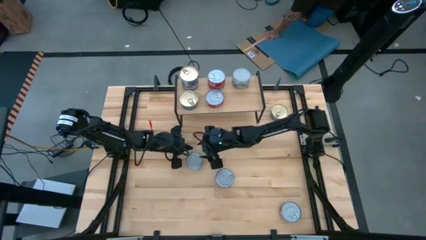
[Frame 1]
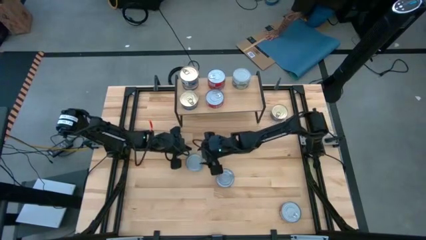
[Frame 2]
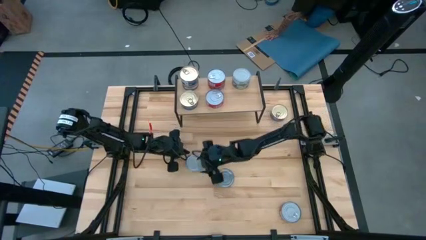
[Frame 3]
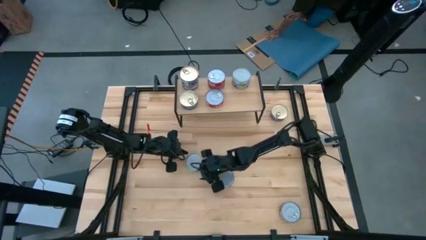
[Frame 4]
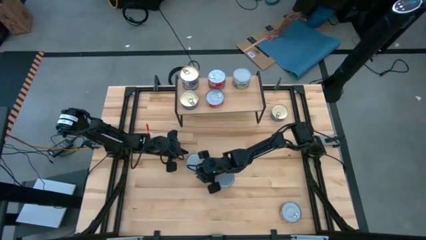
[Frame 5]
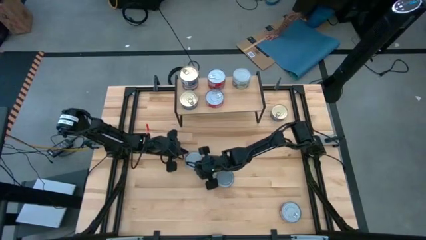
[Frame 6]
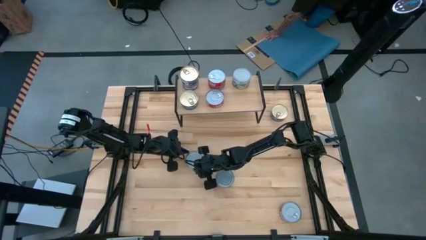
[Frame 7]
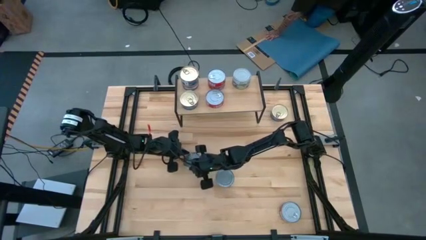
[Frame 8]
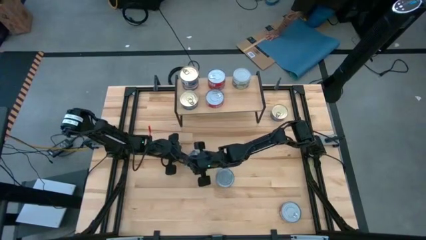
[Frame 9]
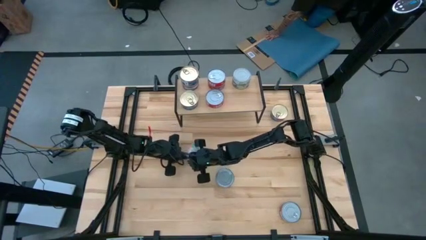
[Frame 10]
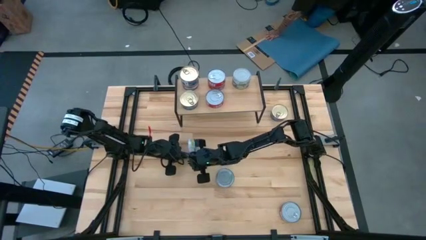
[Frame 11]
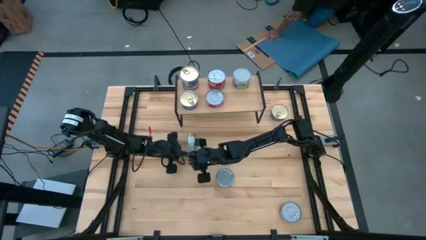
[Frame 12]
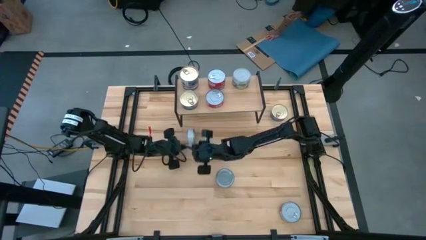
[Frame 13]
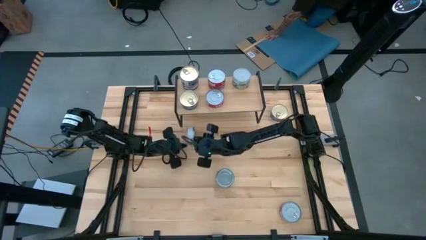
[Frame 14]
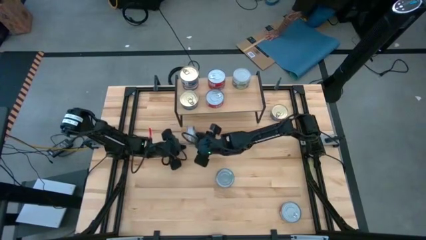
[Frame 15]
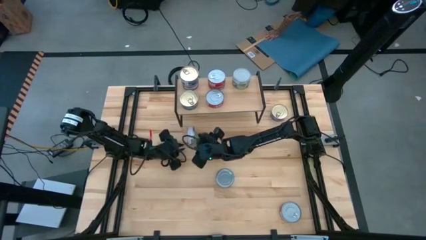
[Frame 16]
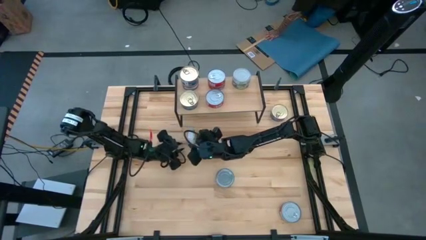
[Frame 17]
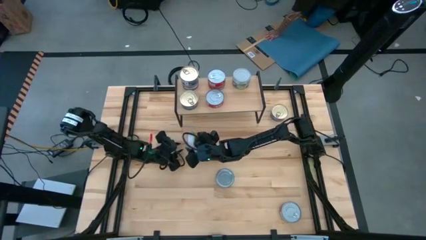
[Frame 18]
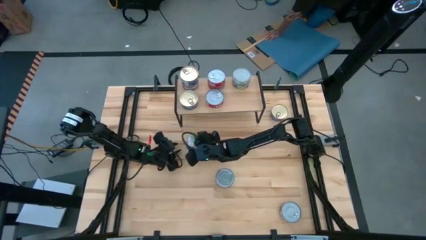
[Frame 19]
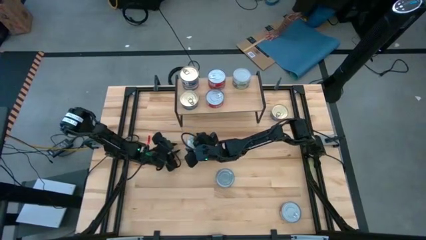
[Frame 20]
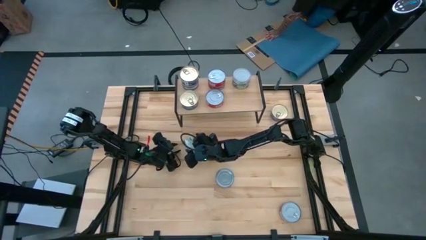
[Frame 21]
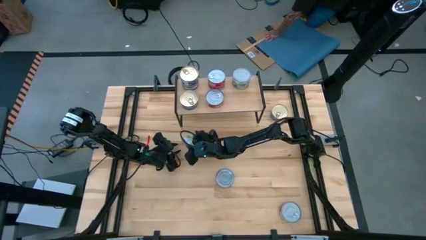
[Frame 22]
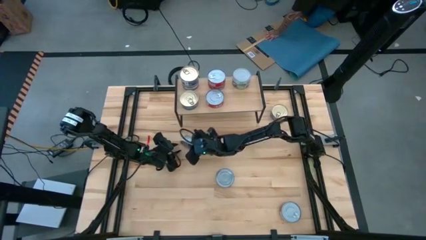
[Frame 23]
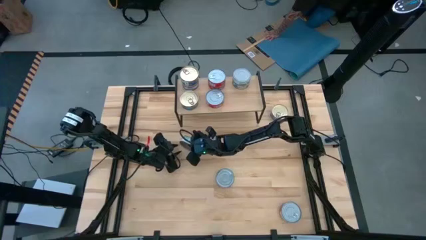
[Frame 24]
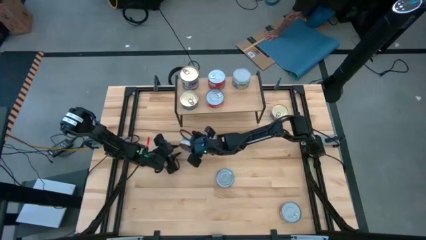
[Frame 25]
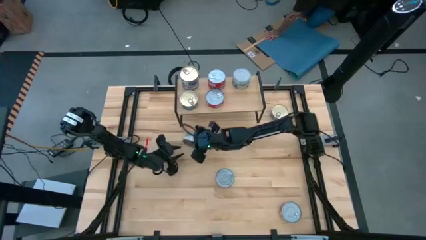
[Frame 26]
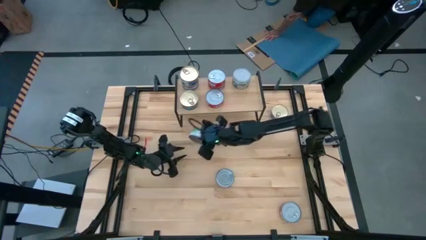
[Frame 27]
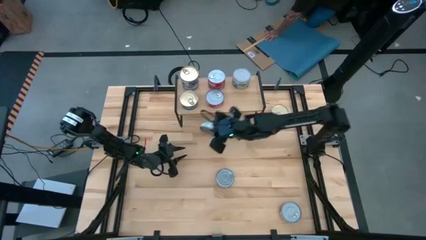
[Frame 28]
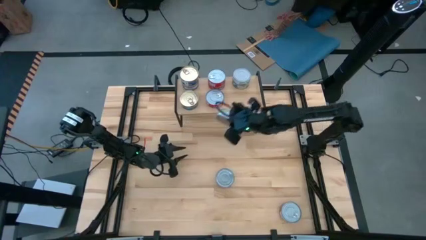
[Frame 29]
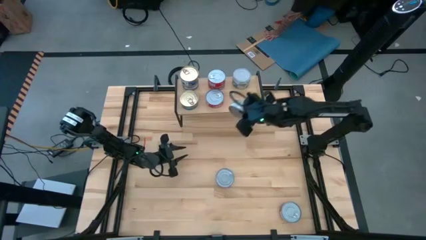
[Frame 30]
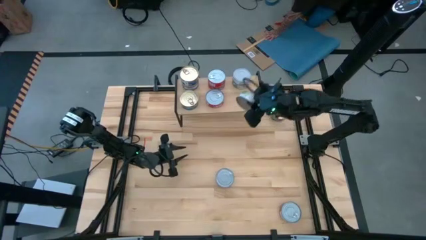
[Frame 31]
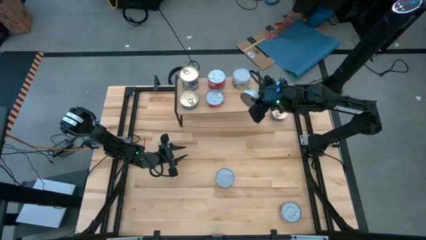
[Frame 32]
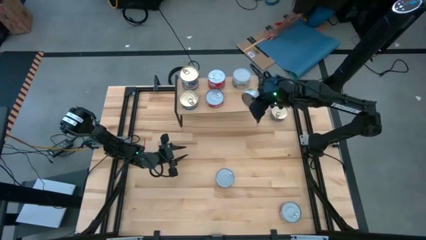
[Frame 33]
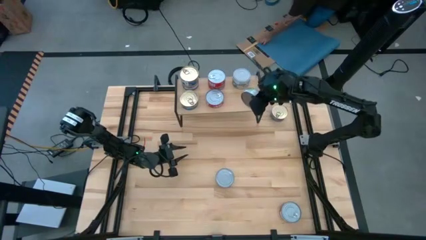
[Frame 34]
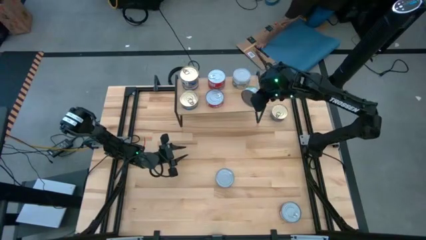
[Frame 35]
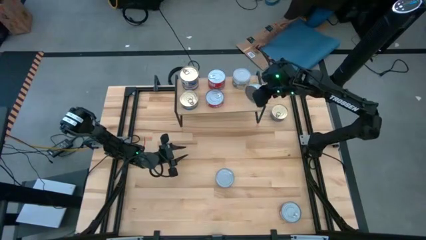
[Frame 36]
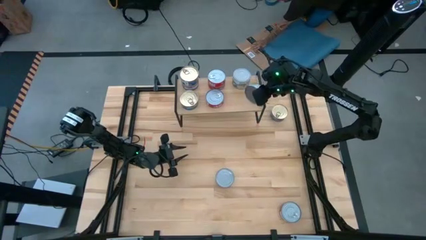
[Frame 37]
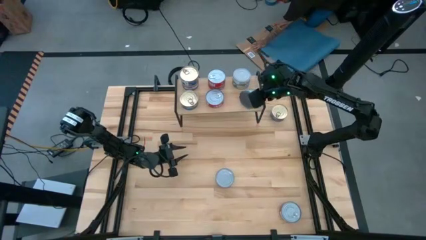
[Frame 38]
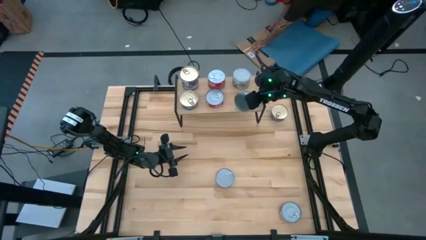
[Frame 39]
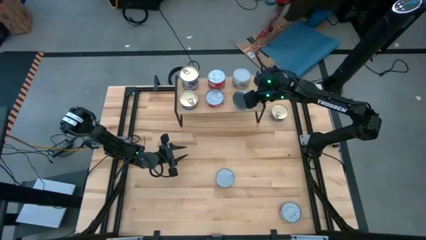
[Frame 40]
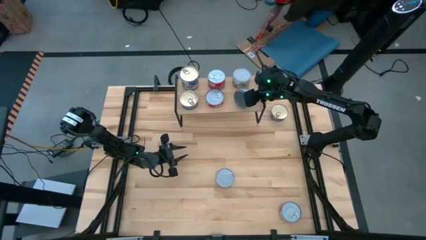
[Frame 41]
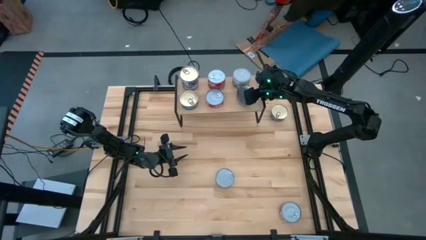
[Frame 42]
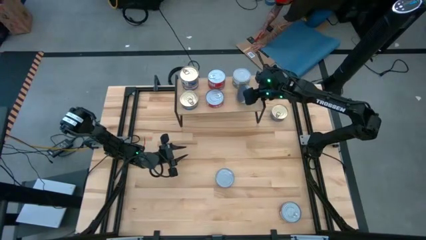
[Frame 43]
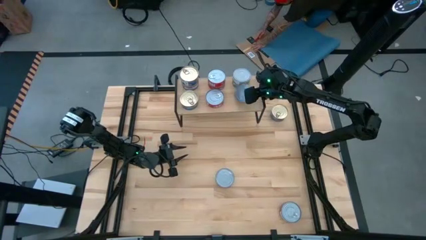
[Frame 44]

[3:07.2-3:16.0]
Task: Stack canned seafood by type on shelf
Put the green tuna can on the shelf

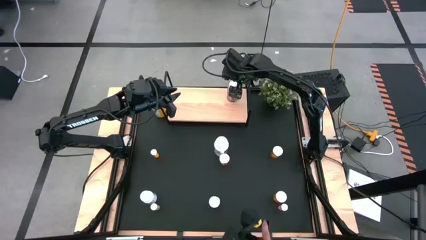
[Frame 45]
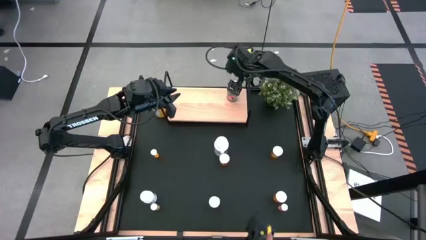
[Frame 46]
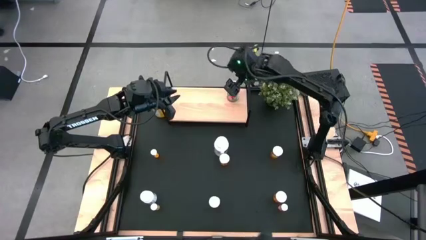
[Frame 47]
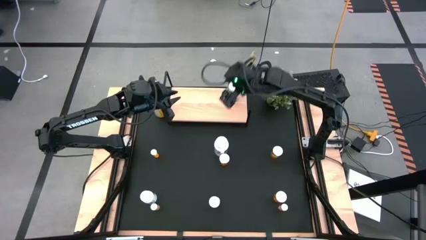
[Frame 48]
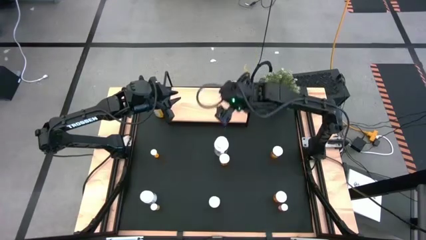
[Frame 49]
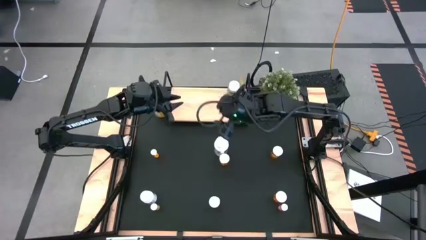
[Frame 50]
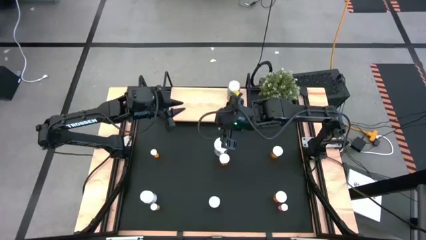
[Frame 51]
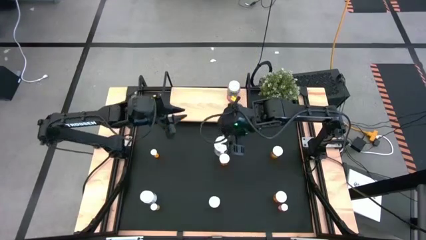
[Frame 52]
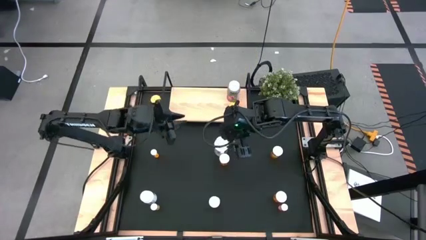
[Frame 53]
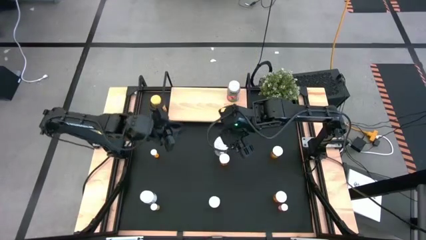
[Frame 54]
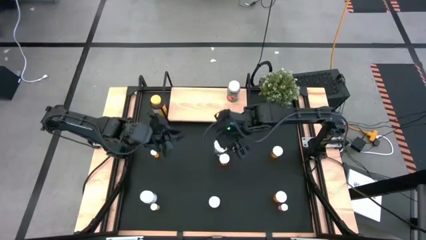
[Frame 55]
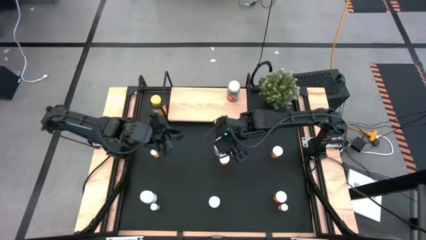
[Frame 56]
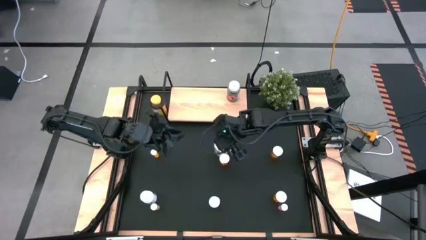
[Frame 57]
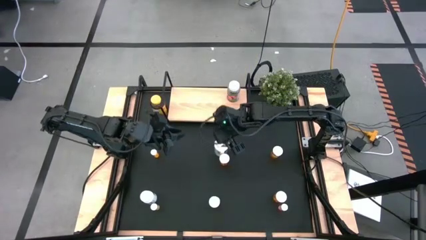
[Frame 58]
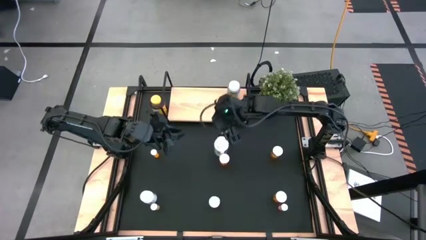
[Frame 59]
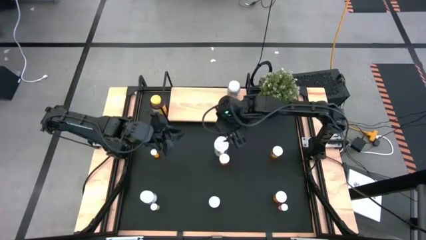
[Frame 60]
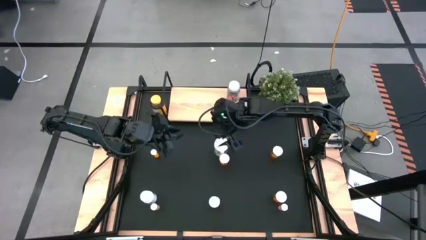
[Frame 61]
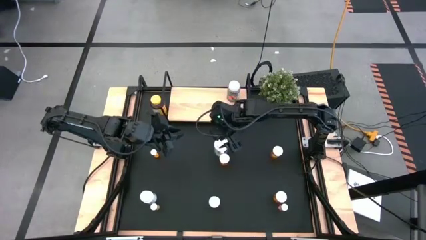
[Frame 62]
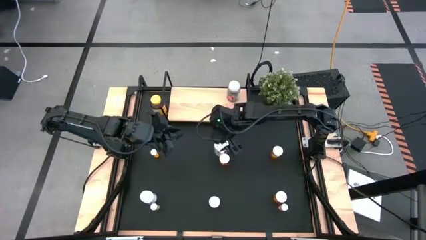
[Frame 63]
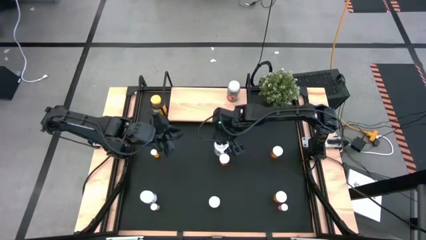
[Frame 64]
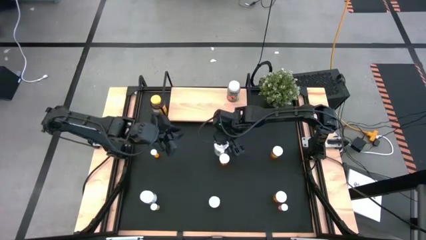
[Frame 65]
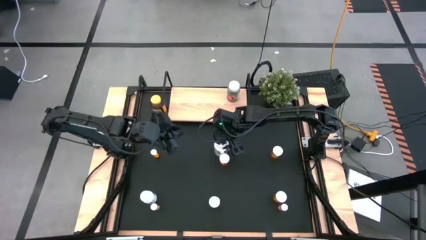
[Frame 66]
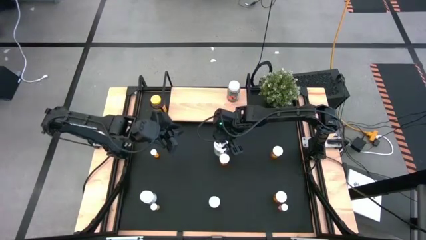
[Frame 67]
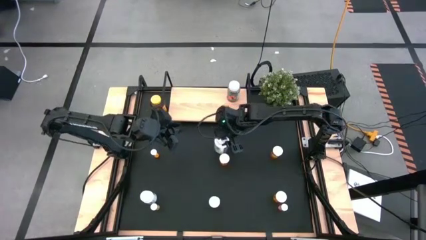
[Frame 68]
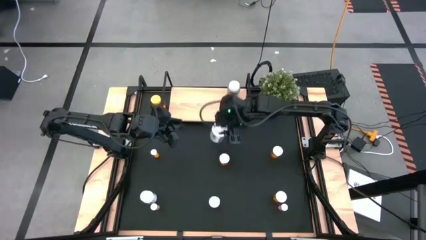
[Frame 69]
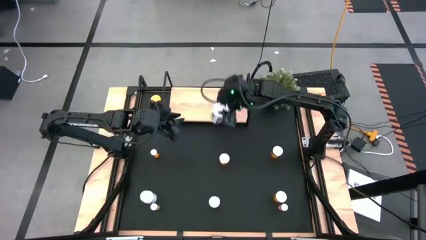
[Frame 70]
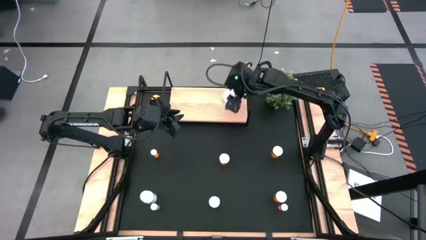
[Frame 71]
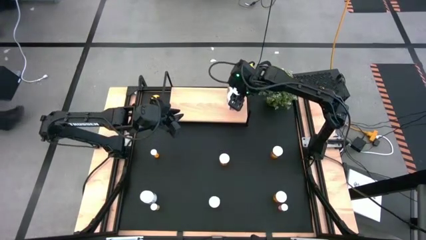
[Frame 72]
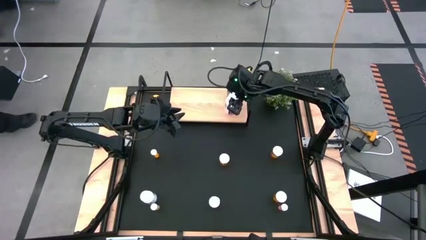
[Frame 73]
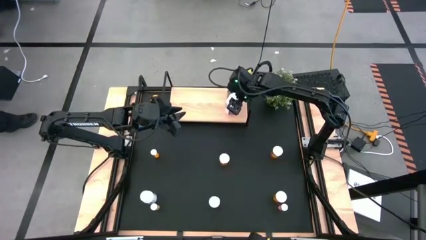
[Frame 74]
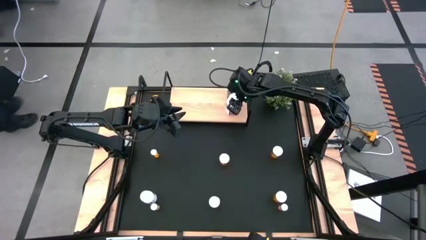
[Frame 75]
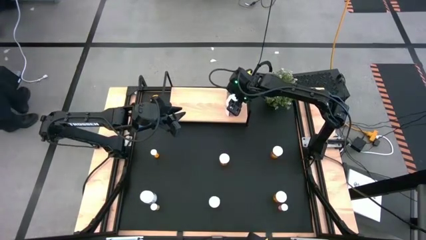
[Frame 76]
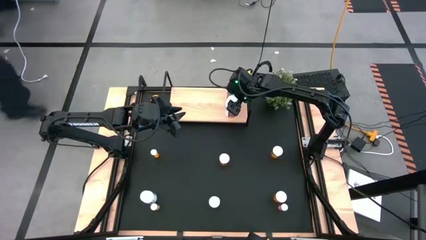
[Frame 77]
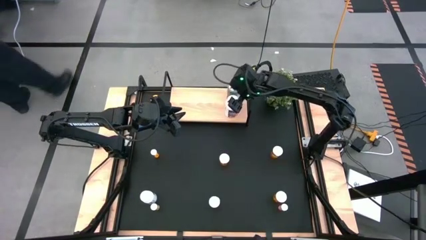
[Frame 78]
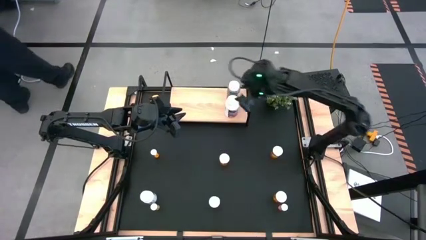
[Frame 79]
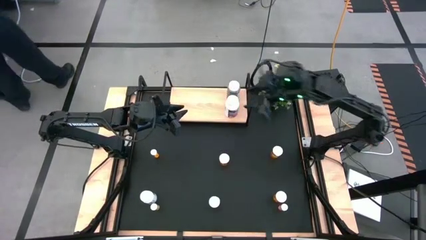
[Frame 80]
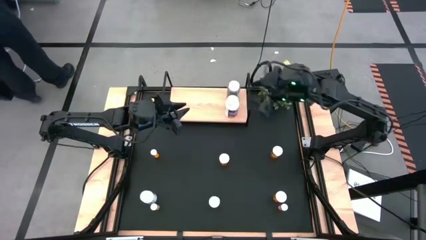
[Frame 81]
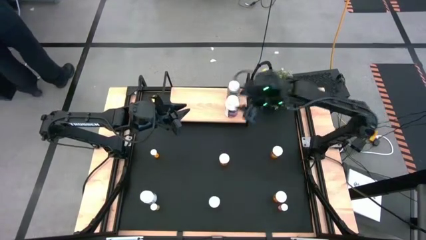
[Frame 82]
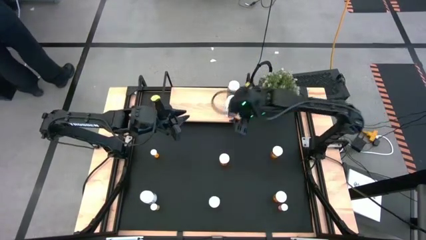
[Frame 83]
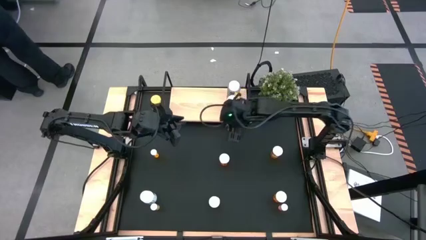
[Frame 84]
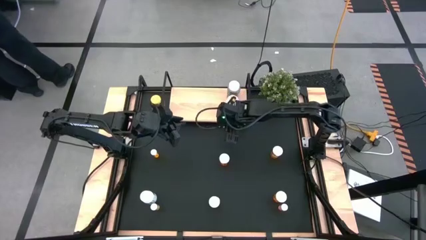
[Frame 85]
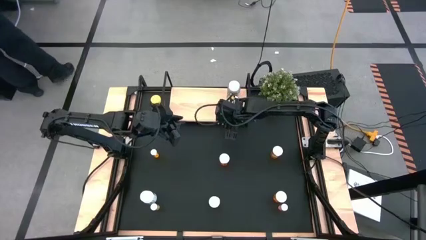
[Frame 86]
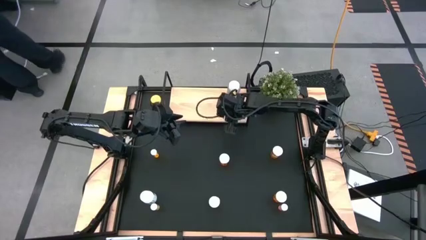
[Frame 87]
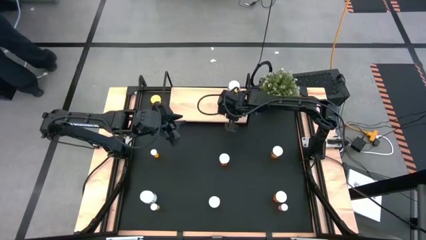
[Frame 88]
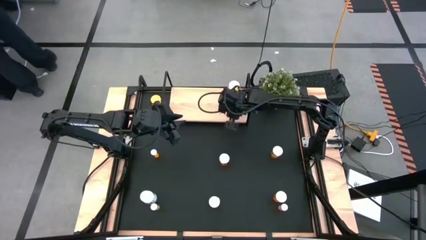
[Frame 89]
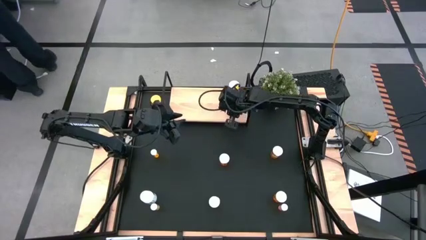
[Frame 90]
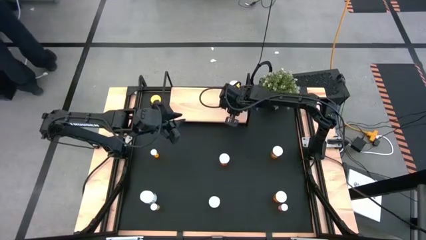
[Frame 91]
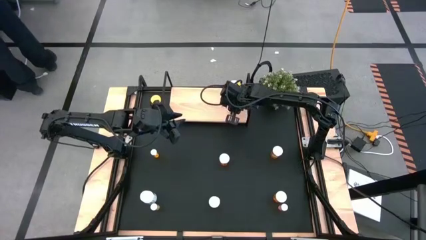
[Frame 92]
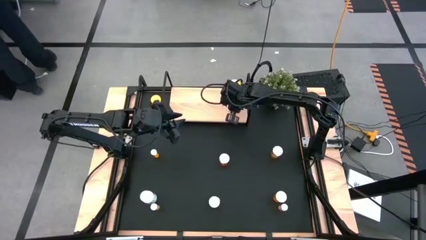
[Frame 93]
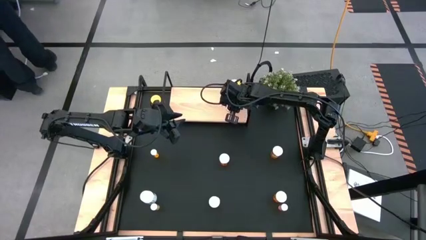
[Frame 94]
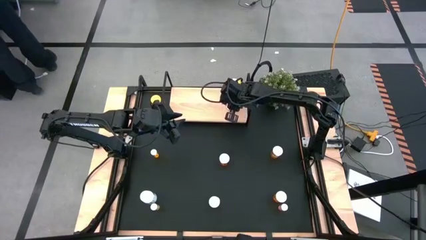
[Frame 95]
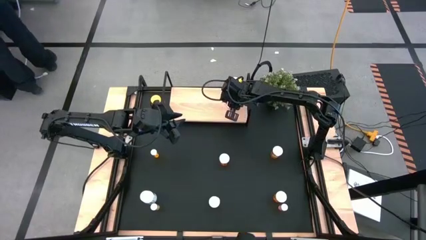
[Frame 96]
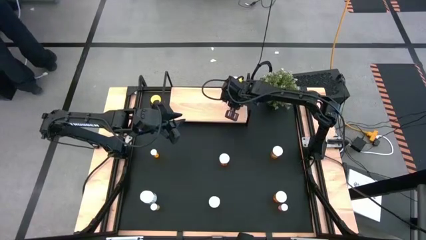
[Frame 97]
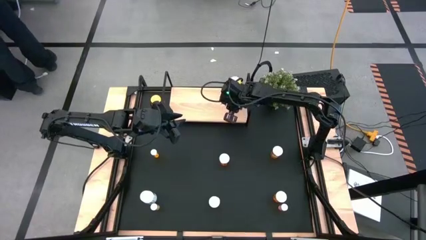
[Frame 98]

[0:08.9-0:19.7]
Task: Pick and place medicine bottles onto shelf by color
Put the top white pill bottle on the shelf aligned with the other green pill bottles
